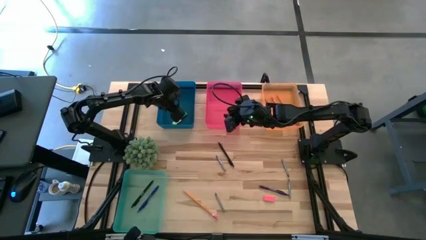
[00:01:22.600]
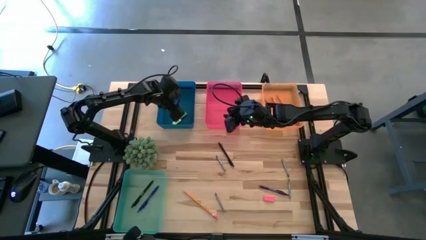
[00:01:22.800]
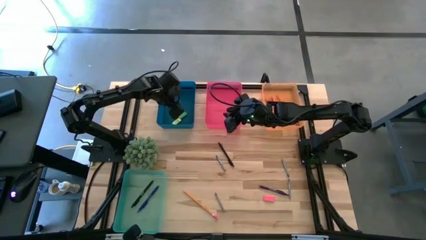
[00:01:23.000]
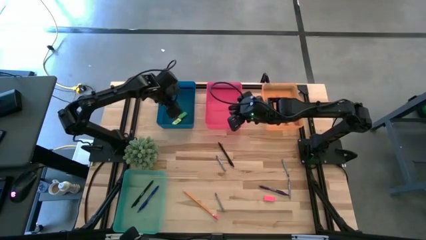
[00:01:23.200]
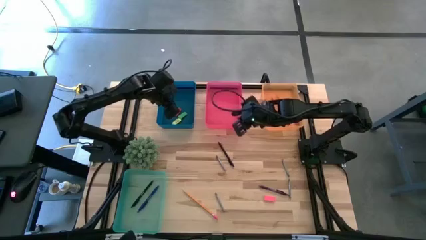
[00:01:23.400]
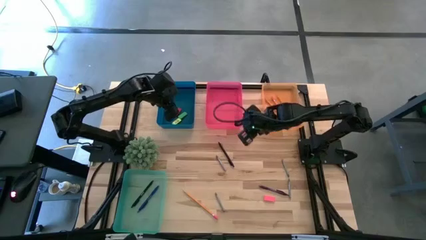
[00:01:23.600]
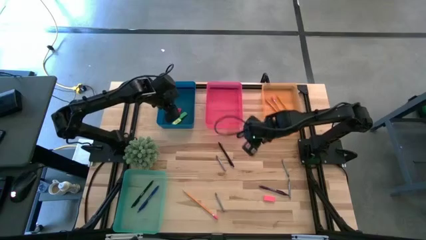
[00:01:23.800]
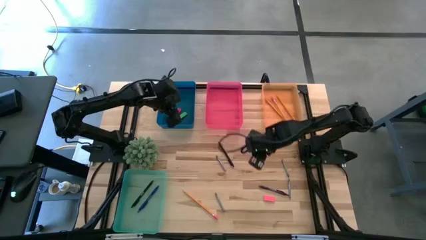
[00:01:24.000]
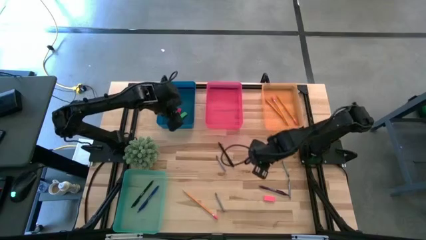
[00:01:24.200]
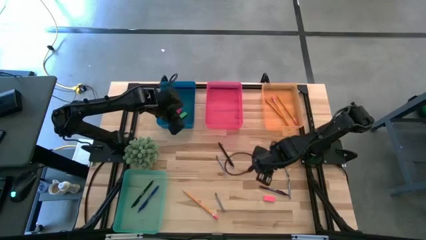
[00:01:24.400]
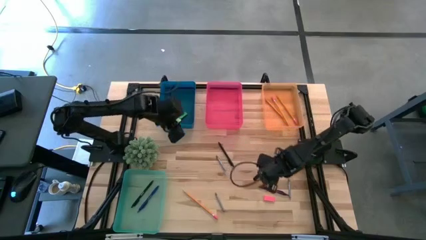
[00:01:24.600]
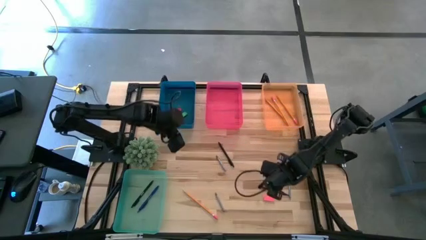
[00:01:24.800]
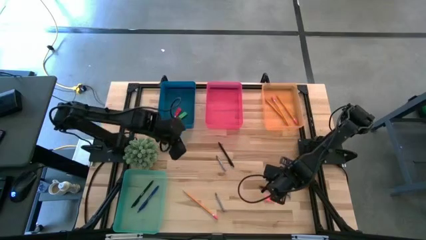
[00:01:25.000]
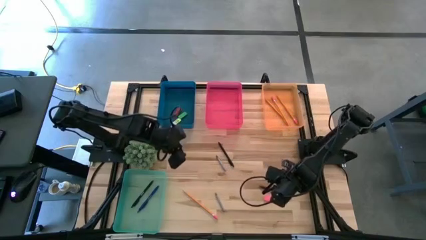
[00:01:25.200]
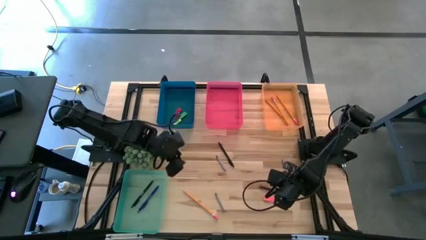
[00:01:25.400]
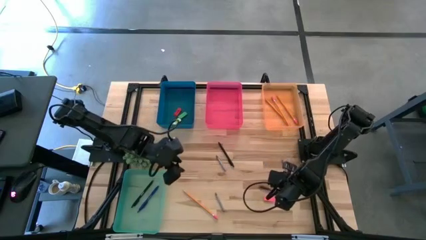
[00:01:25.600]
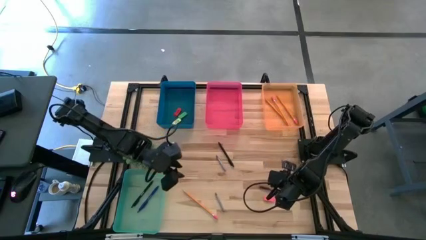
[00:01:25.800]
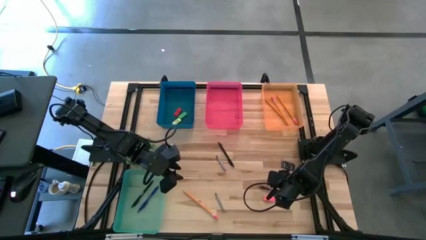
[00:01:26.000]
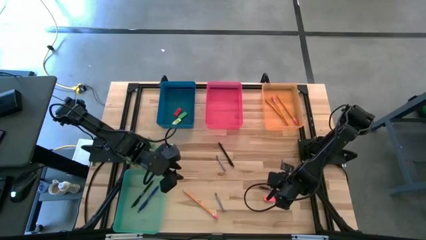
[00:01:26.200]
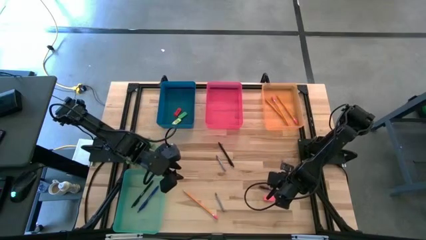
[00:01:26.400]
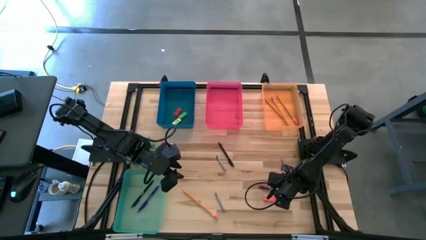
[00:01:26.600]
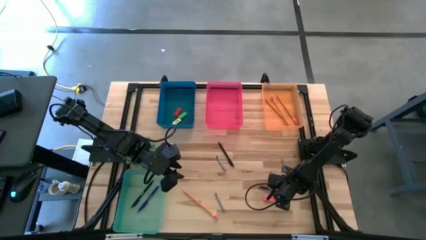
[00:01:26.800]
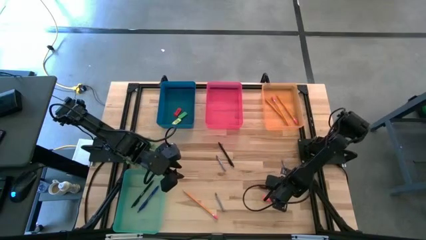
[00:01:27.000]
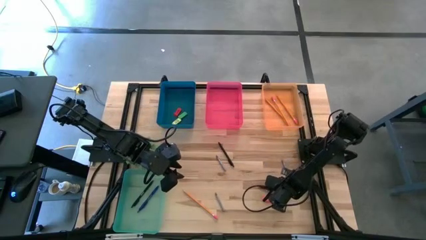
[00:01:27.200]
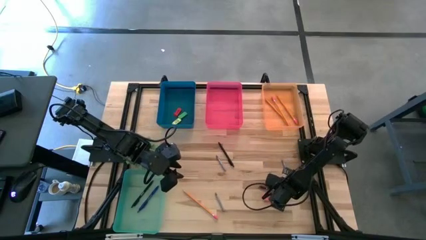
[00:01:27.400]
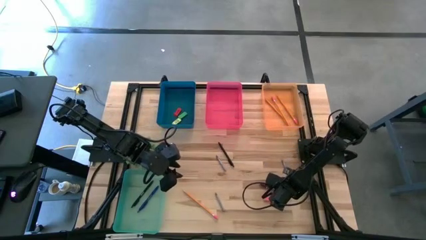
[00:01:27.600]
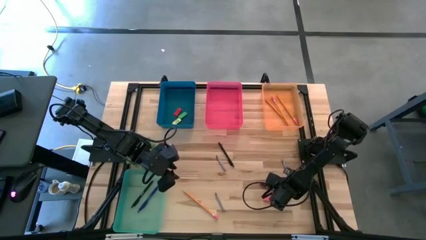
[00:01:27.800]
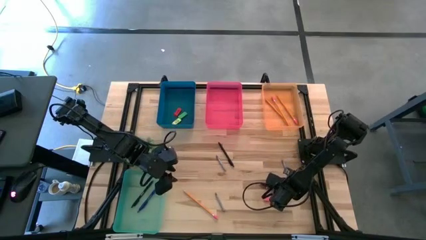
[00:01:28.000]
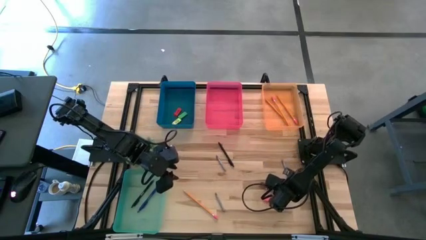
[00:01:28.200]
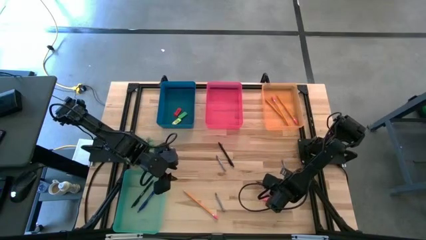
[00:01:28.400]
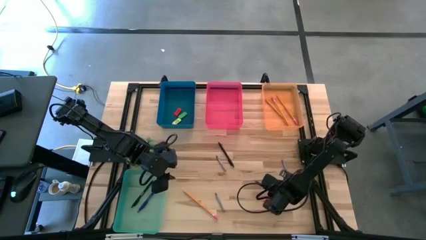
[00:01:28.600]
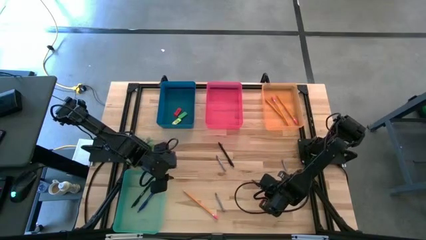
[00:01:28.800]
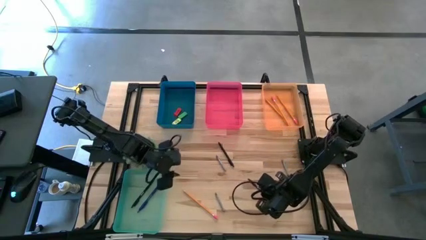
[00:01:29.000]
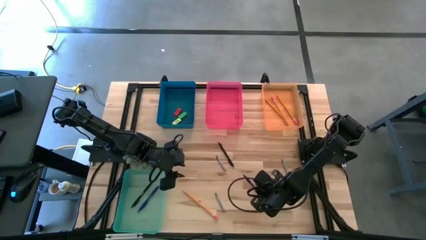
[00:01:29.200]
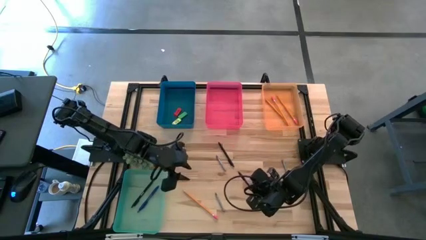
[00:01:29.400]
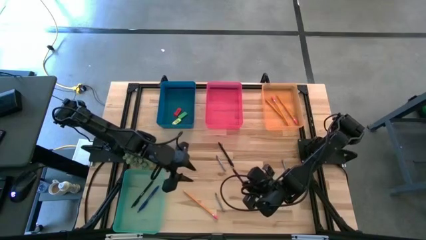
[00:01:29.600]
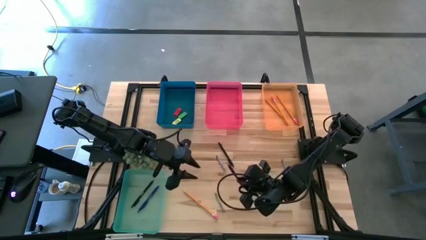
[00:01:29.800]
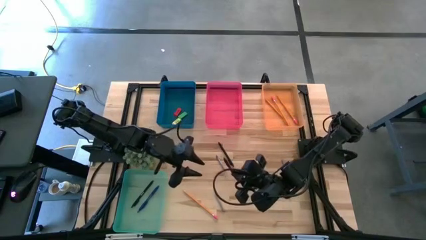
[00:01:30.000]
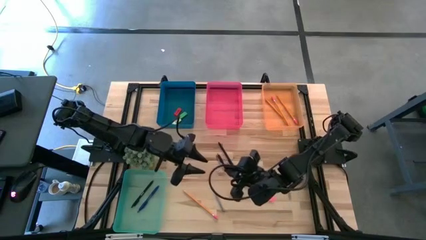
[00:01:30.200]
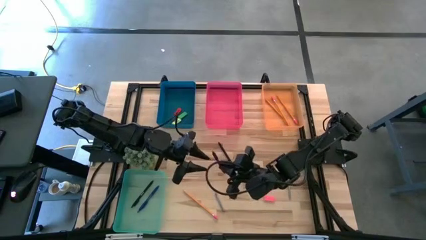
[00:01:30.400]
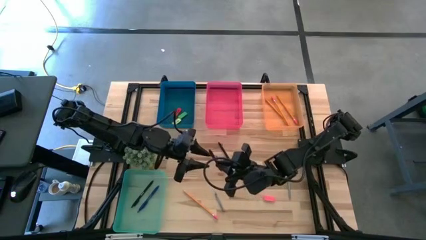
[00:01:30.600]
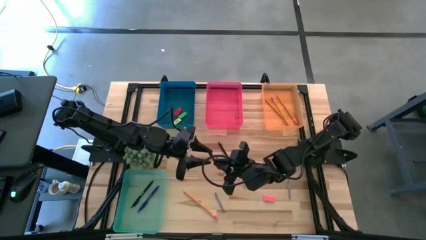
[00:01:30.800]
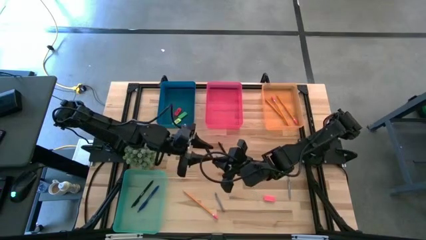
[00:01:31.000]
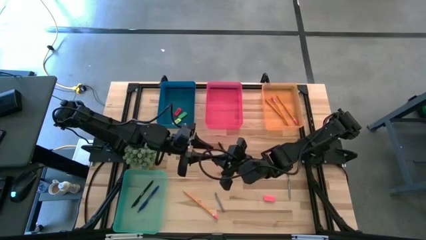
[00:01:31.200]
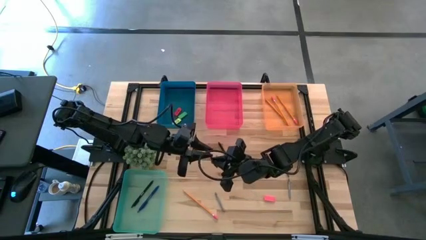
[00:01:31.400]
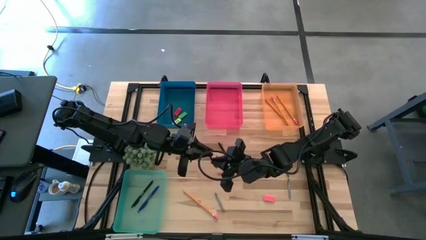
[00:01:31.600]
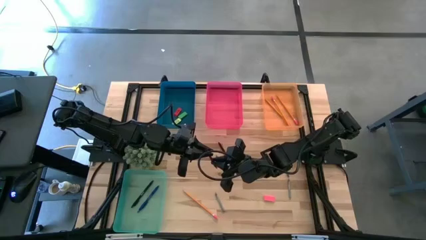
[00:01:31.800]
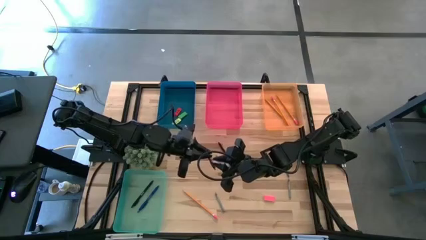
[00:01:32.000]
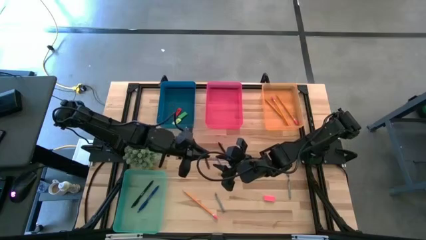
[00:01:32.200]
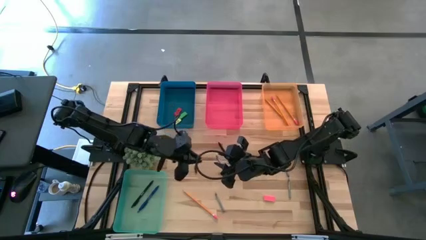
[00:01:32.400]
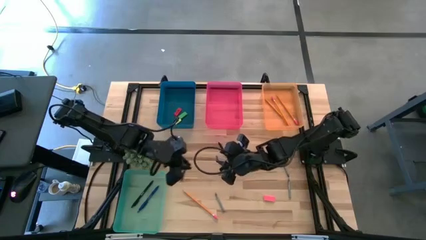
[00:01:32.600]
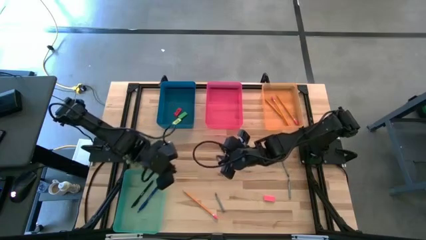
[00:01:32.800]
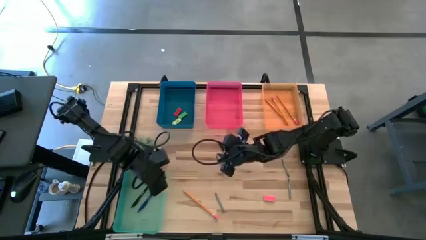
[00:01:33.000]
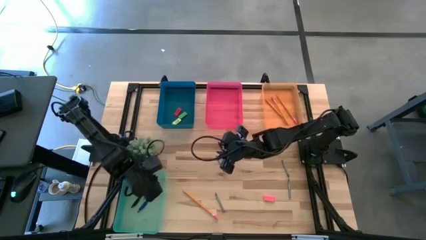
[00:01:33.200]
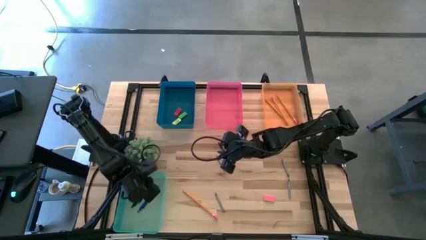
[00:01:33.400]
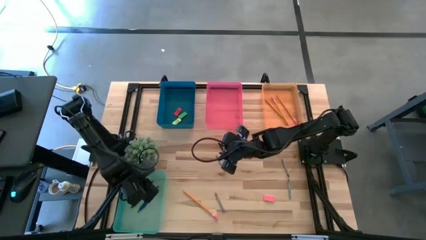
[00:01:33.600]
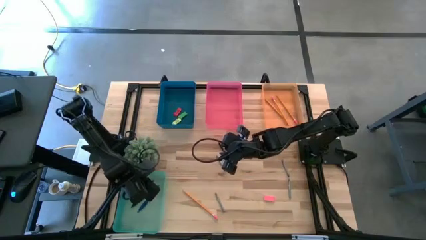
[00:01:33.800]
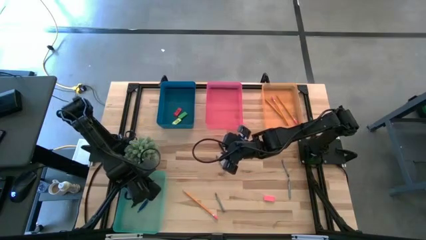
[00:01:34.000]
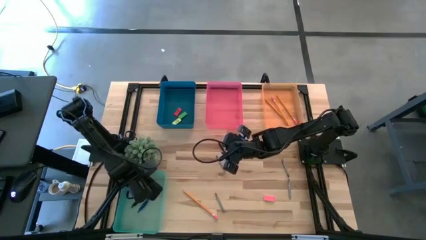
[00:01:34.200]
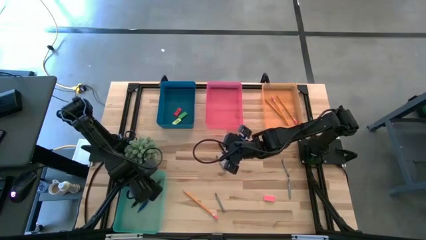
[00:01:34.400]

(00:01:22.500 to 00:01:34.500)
Task: Sort crayons/erasers/pens/pencils in bins
Put the purple pen into the transparent blue bin

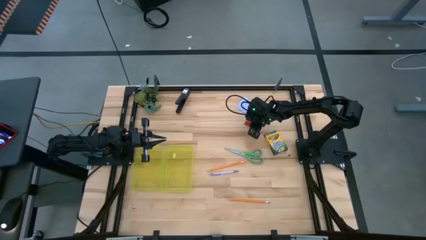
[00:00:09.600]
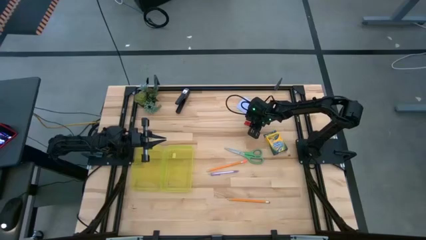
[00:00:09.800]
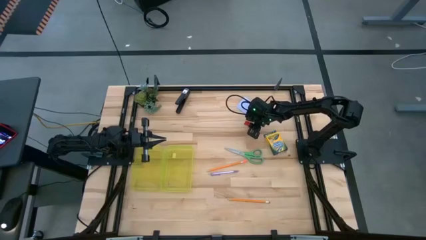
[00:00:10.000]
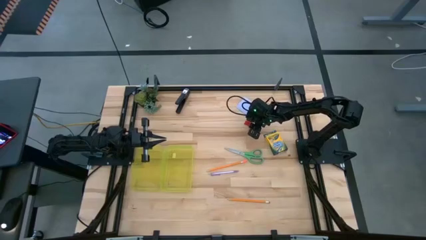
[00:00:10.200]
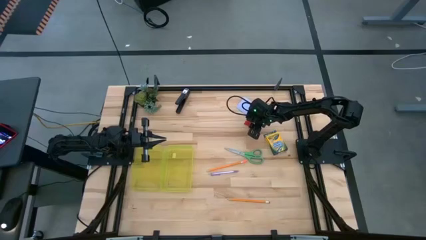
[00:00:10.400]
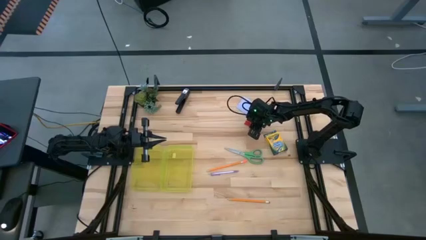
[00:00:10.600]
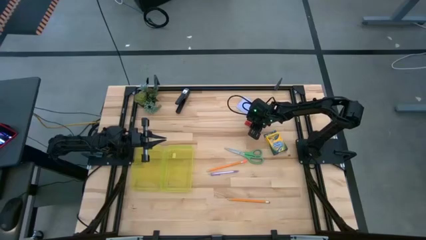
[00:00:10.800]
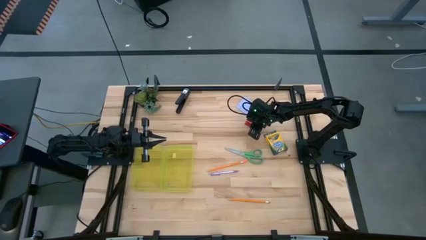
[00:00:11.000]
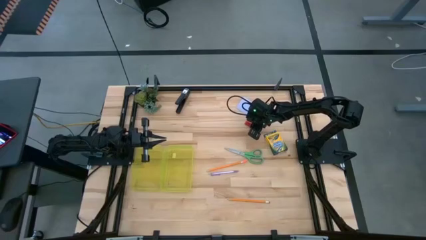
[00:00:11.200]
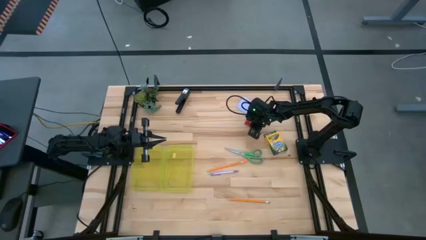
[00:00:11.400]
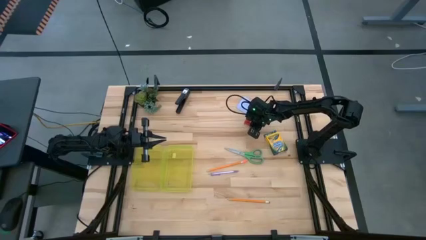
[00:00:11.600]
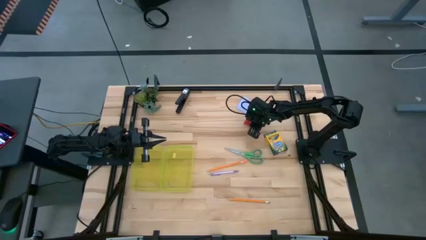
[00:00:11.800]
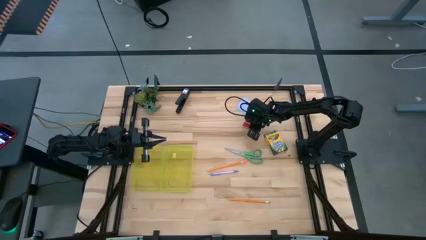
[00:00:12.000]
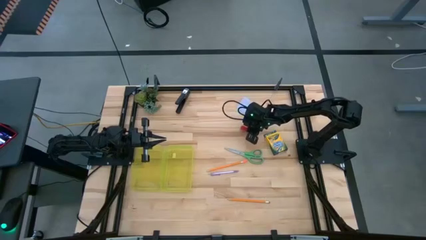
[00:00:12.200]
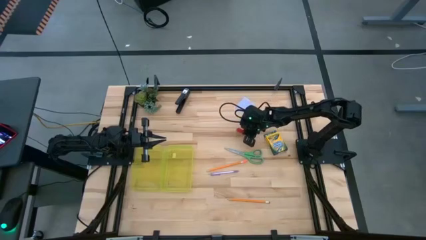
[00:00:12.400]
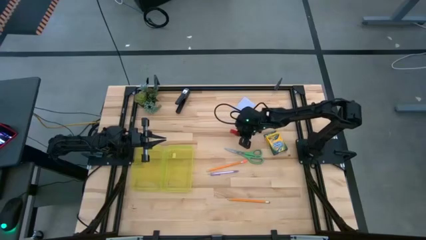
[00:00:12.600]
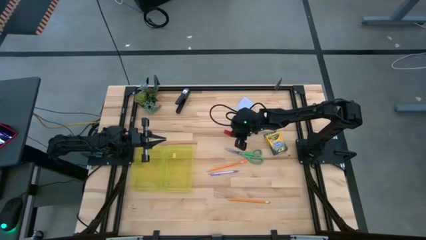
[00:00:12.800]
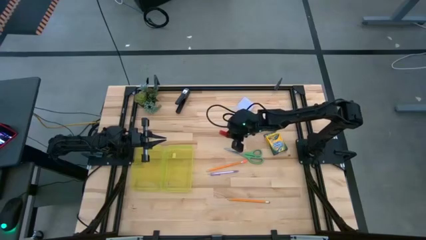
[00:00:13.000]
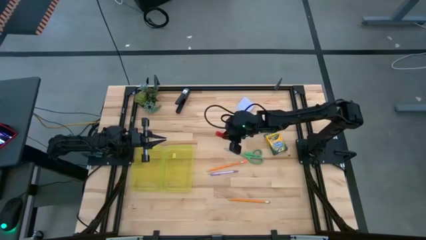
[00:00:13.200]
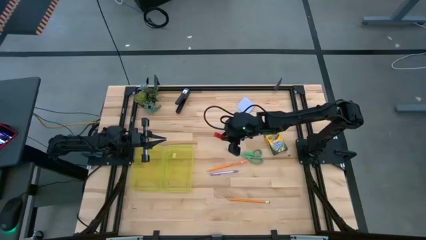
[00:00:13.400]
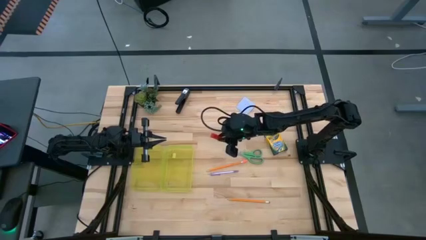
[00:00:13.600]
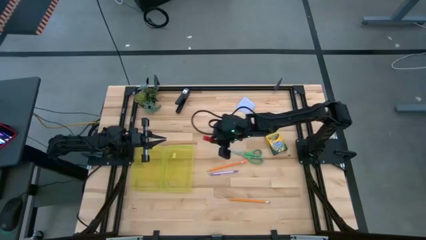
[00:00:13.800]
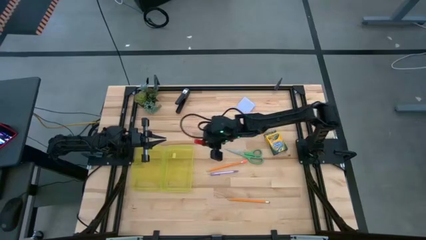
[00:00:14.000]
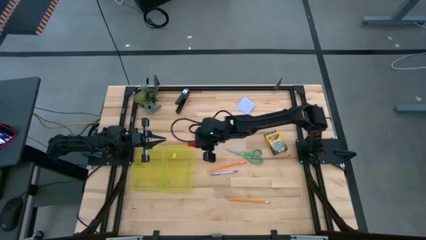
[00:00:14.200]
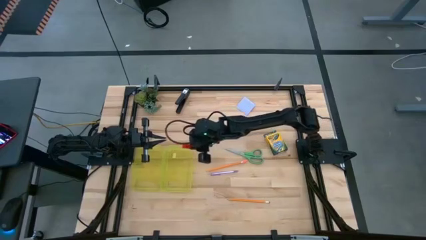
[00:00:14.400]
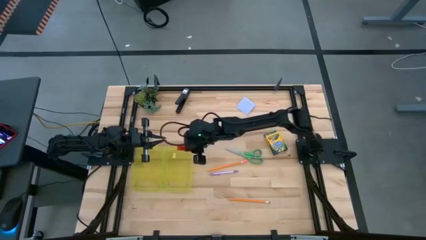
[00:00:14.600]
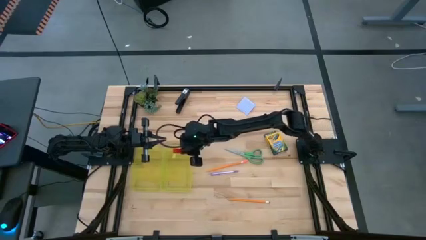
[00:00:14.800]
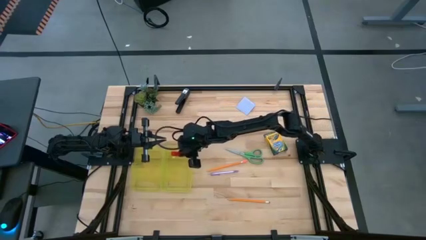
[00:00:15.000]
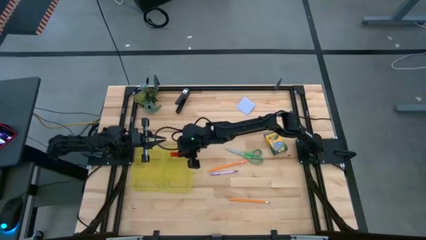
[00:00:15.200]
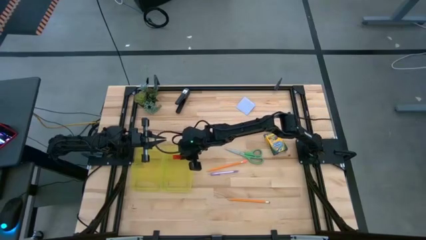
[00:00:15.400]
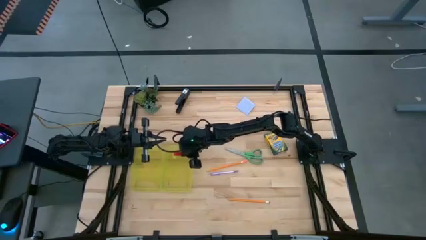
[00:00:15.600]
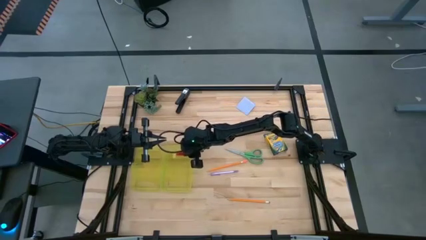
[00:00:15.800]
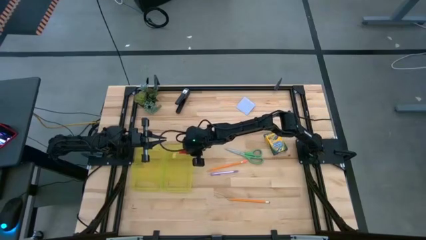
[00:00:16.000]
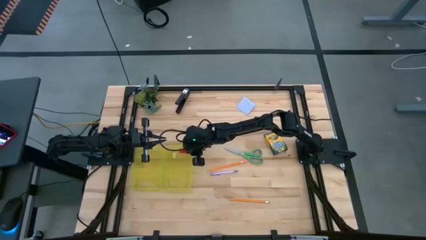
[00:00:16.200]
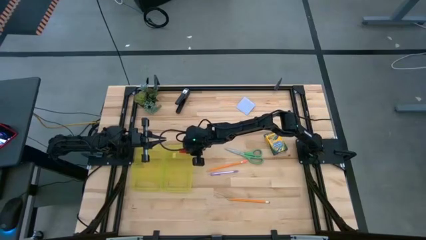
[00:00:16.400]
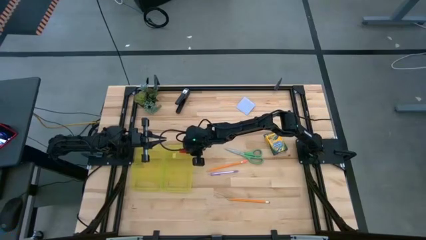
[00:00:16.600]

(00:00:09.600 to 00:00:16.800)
Task: Pack school essentials
Put the red eraser into the yellow pencil box
